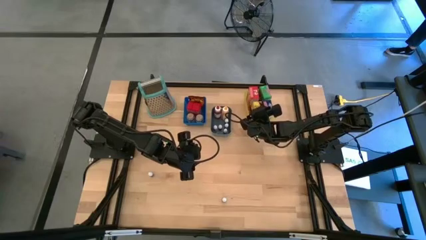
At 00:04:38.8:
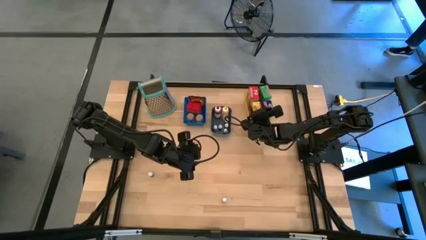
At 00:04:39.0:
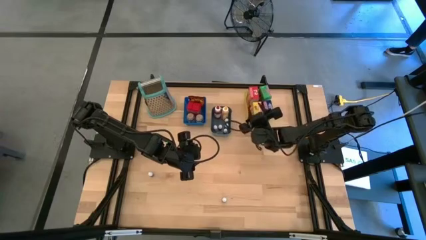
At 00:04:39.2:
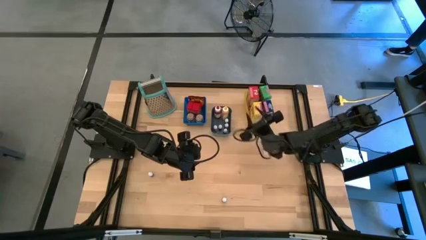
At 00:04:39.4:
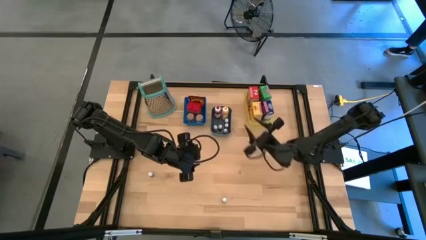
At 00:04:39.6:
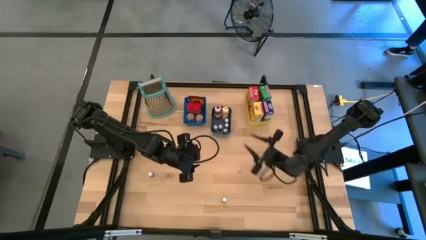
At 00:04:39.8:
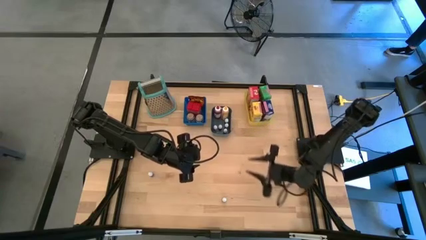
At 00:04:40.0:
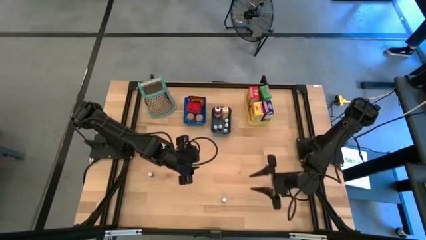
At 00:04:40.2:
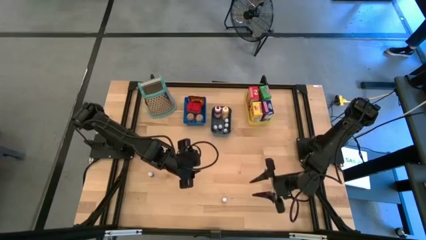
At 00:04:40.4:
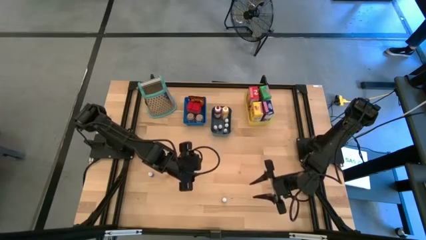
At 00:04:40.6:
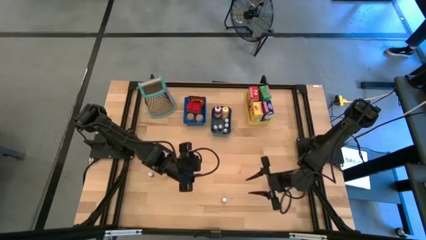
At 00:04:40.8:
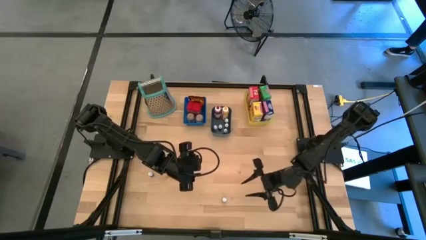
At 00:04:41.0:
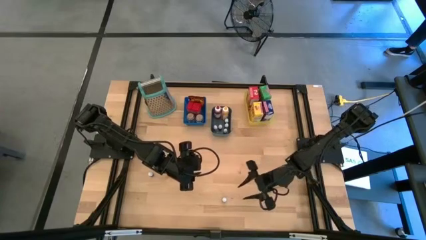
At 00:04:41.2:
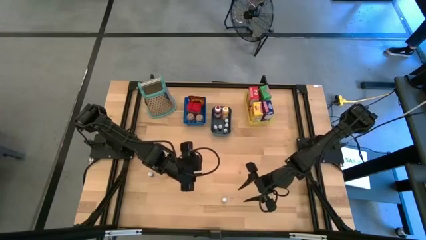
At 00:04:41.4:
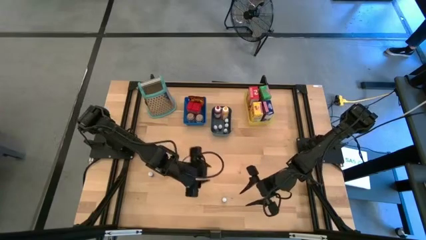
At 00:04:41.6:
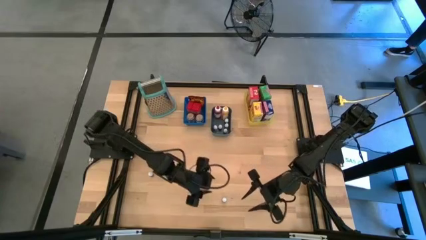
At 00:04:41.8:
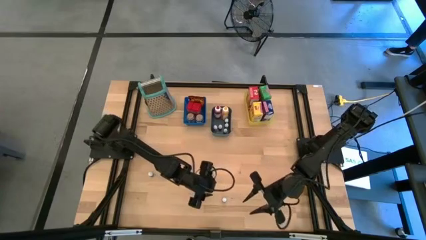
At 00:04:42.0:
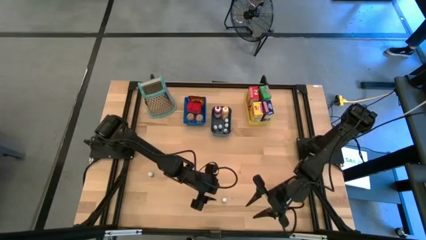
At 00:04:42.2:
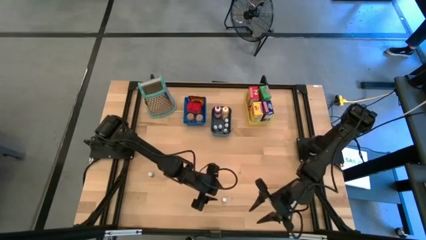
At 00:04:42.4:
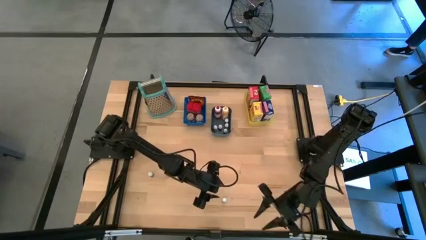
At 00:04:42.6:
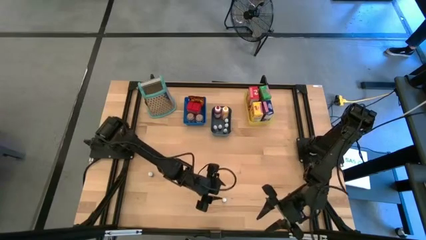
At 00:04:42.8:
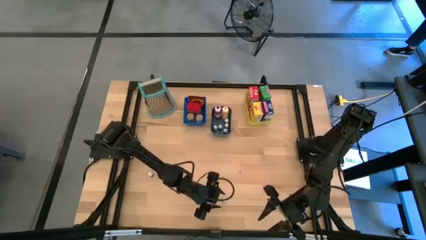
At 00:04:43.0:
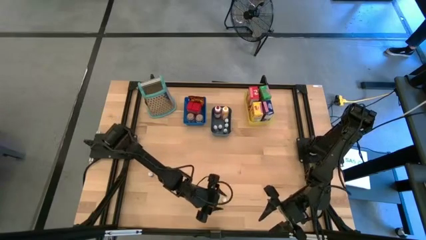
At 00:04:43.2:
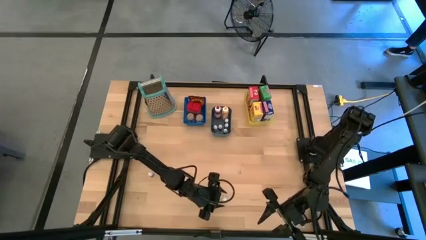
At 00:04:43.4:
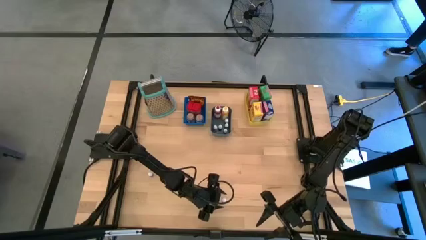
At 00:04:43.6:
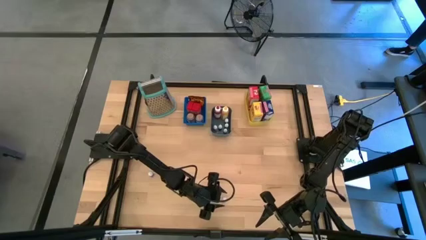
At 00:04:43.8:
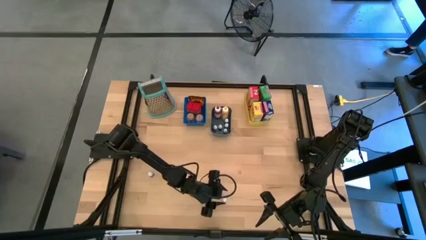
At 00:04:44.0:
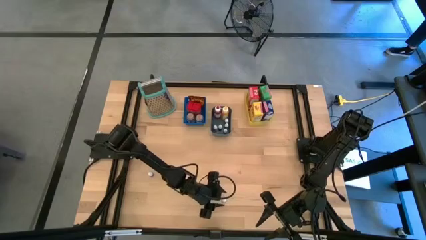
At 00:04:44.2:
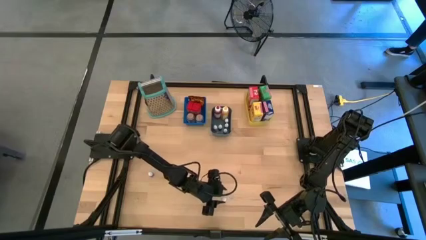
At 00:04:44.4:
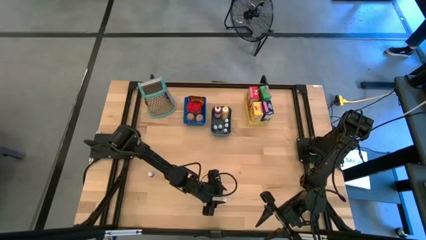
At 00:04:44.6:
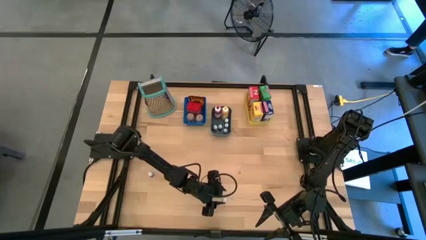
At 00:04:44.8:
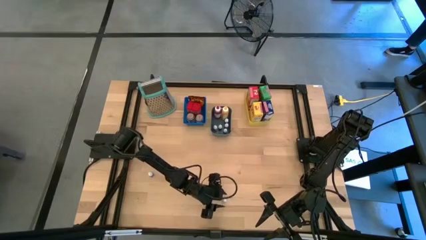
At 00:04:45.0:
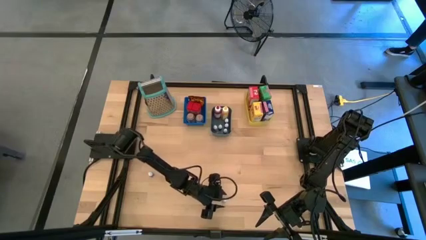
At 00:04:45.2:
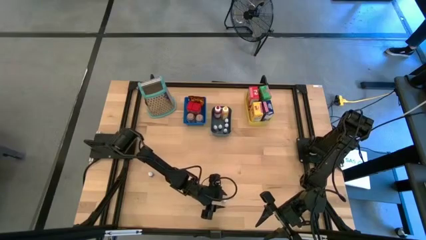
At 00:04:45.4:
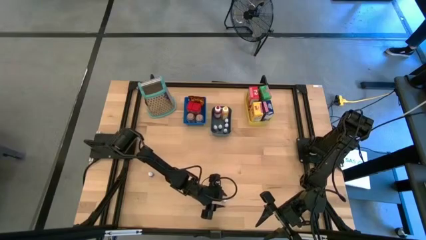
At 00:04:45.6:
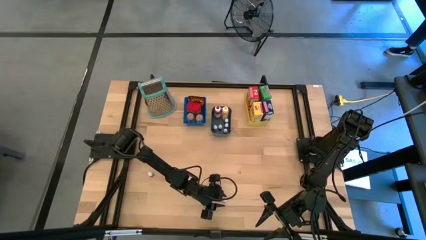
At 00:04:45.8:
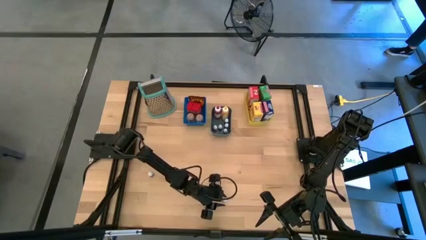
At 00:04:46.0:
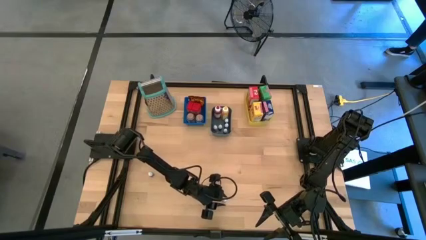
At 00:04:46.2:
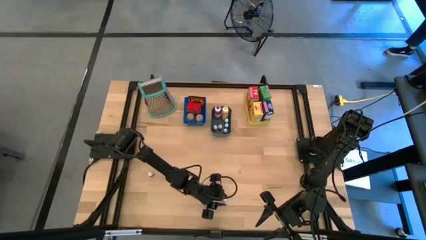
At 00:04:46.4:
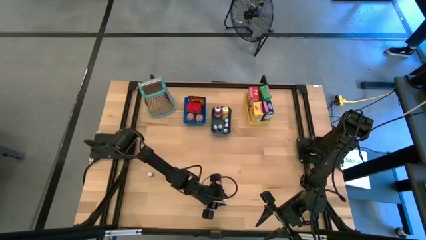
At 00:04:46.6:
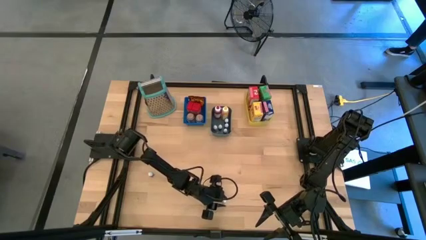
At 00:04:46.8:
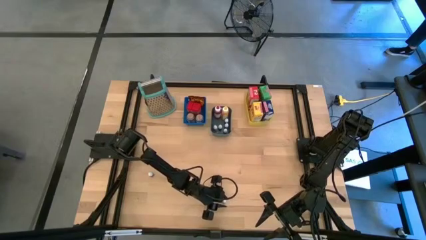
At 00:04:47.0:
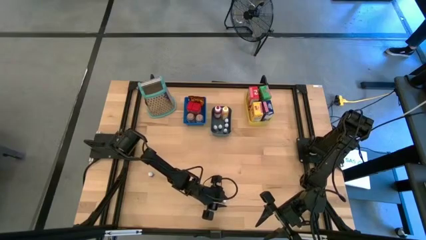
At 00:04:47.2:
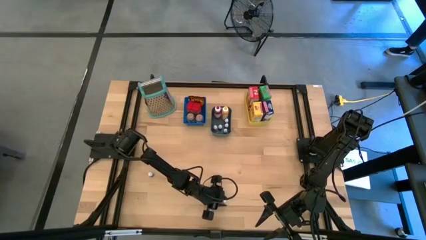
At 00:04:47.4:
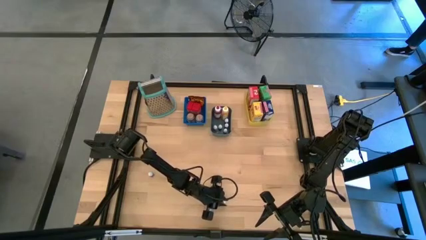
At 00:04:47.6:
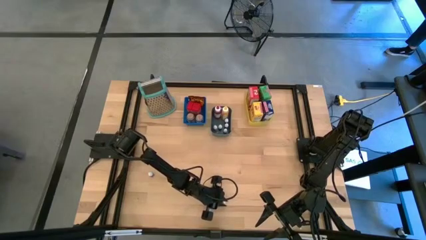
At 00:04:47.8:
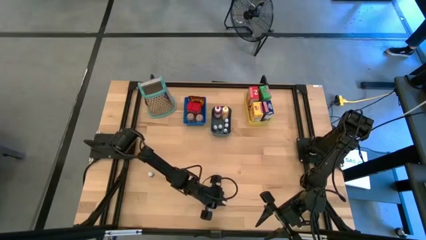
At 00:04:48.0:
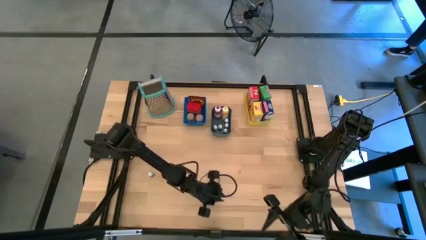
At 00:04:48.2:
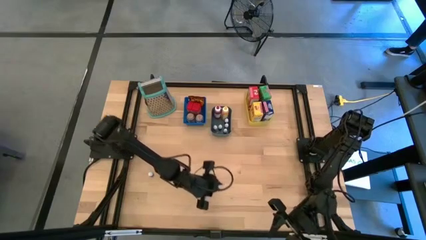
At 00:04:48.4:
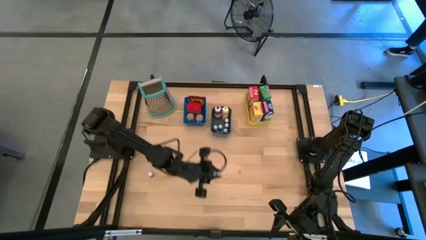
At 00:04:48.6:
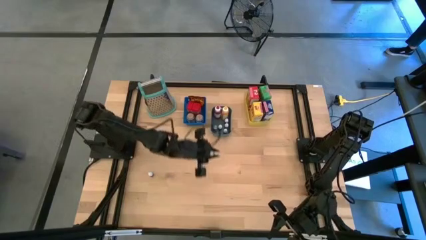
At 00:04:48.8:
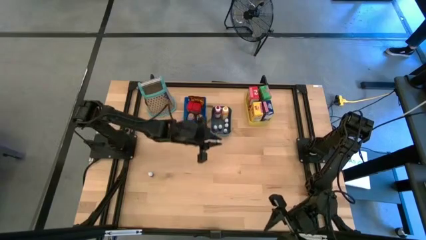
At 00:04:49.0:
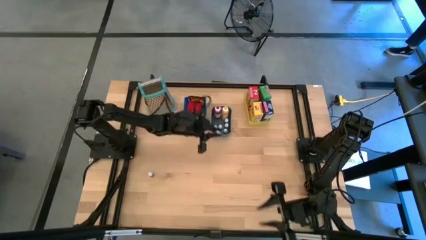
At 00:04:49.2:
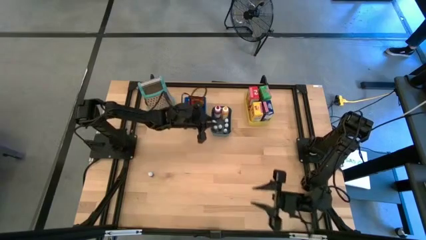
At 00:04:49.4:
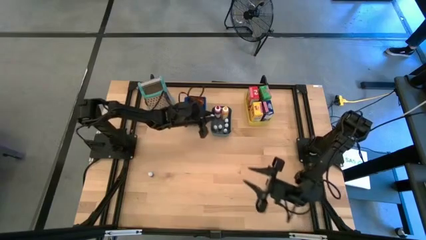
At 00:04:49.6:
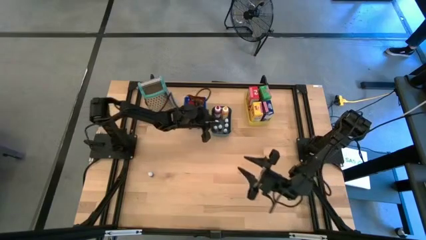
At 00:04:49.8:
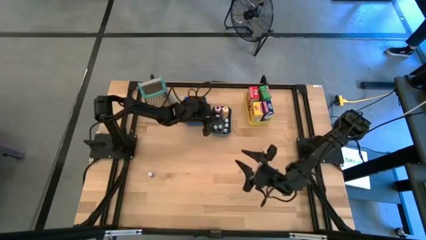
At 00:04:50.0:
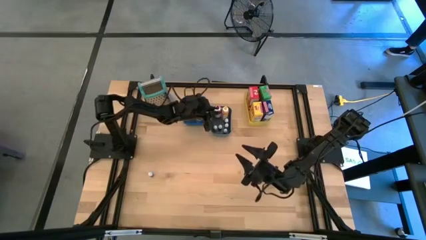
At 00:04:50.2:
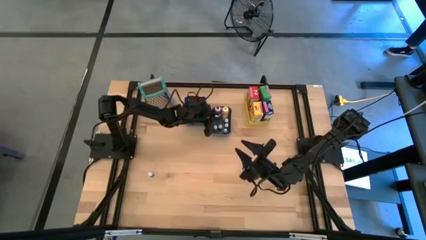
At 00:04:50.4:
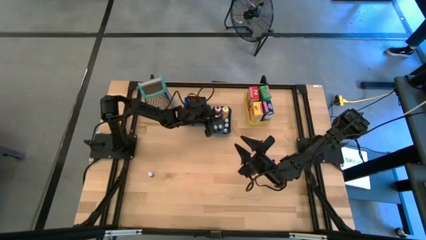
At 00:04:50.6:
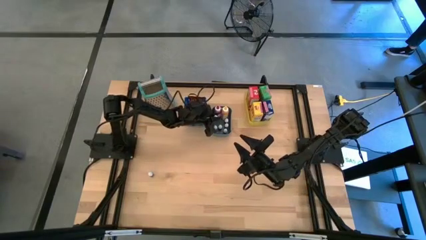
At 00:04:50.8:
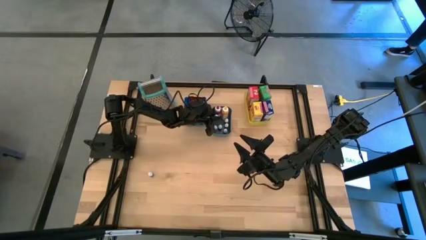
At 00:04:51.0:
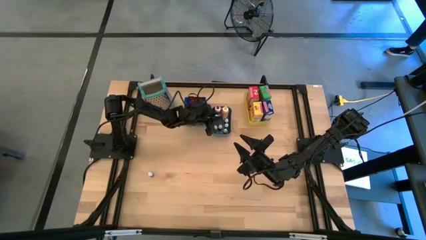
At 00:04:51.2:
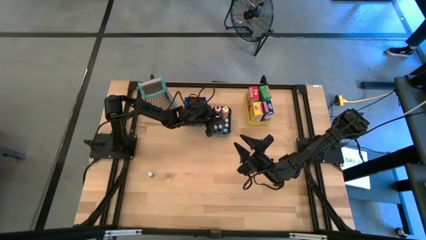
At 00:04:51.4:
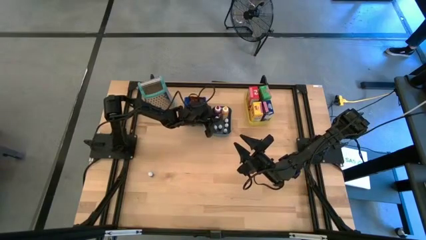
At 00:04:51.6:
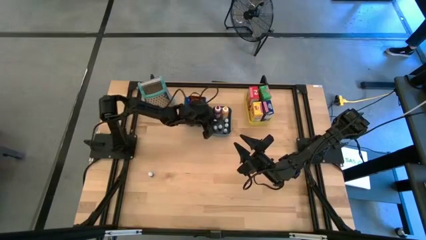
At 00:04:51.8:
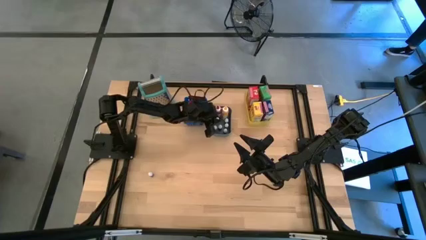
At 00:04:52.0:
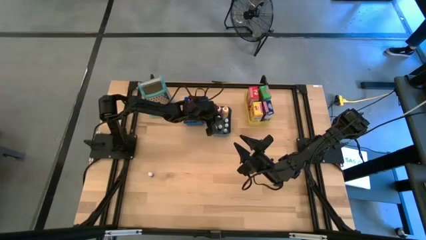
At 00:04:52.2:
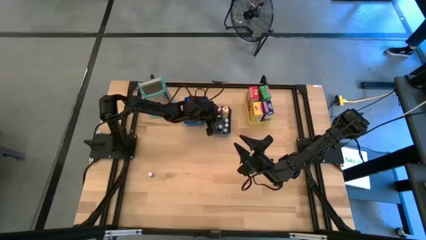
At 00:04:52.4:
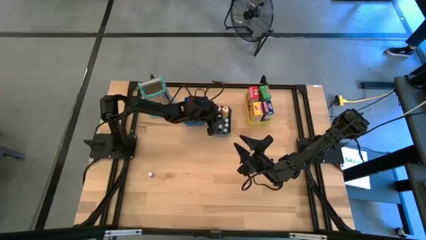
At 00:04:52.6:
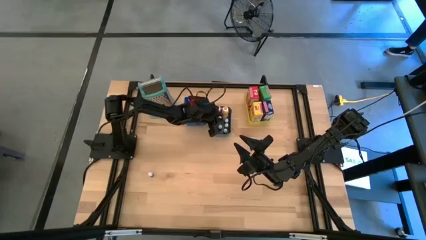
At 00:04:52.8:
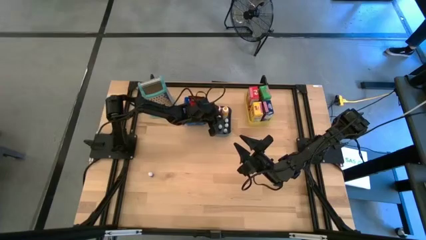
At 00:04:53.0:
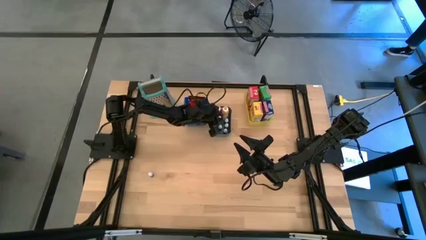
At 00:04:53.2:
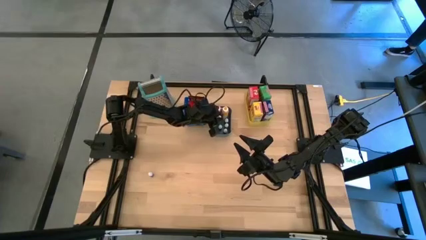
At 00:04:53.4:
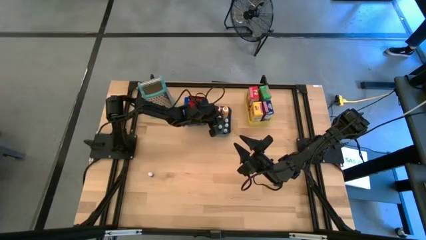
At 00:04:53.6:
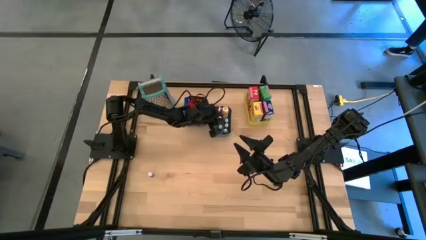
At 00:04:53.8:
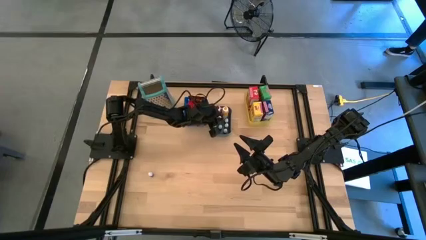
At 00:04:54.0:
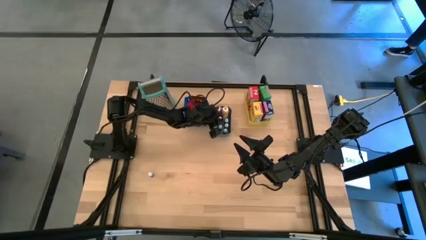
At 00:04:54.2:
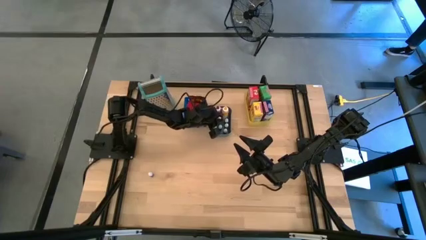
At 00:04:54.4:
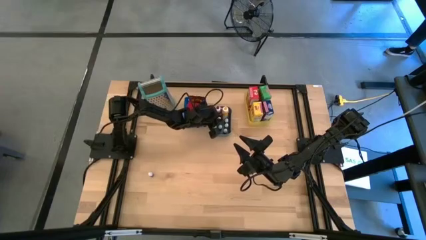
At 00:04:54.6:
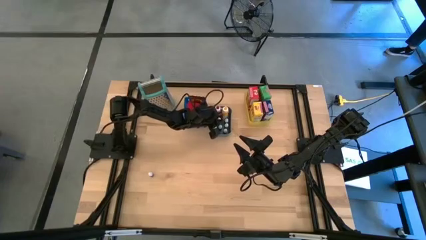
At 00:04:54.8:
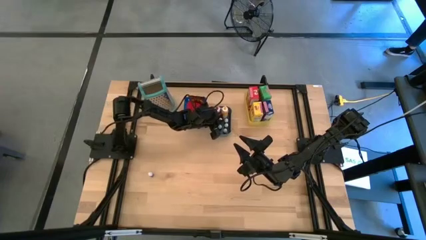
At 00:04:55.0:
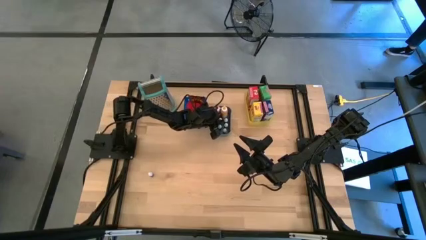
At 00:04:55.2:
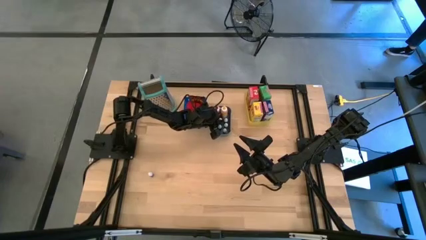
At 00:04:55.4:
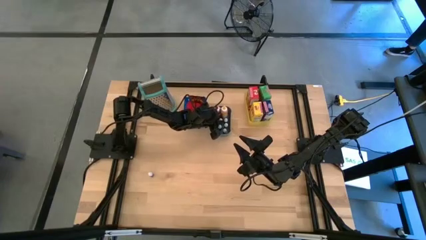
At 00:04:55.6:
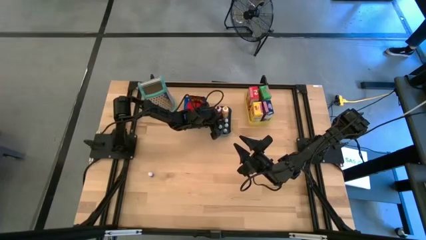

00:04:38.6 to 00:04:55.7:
Task: Pick & Place Kitchen Items
Put the small black food coloring bottle into the dark green bin
